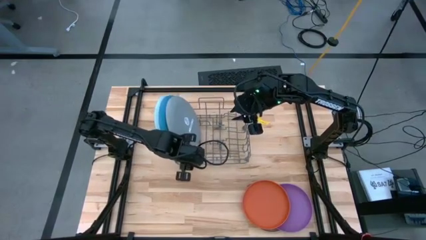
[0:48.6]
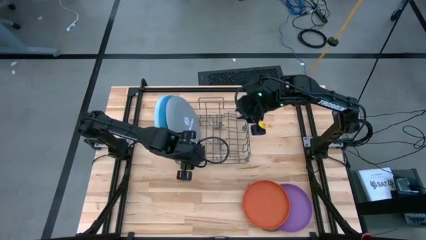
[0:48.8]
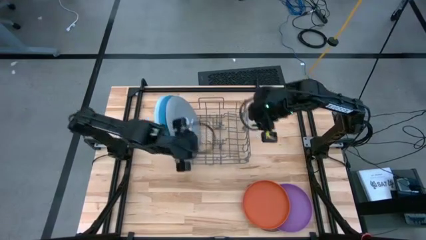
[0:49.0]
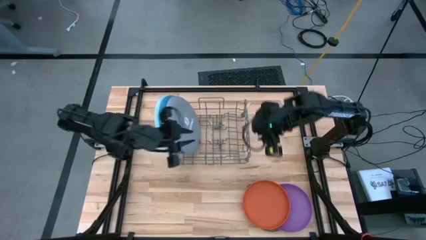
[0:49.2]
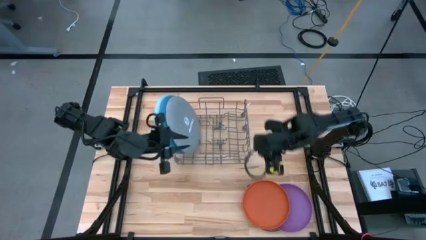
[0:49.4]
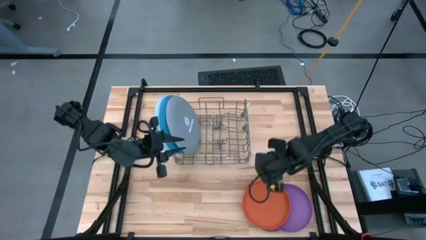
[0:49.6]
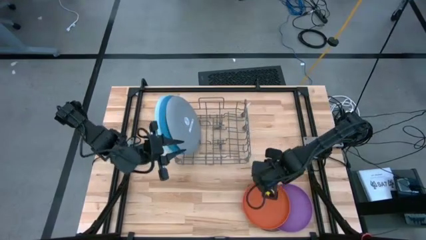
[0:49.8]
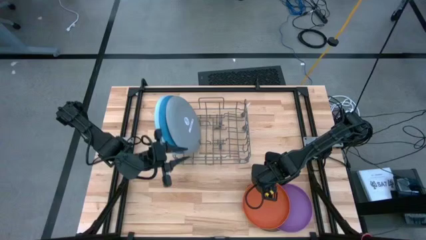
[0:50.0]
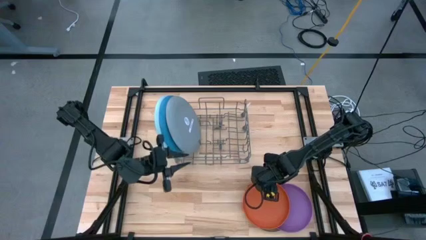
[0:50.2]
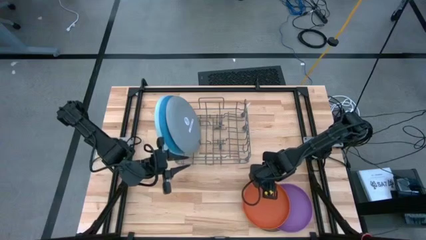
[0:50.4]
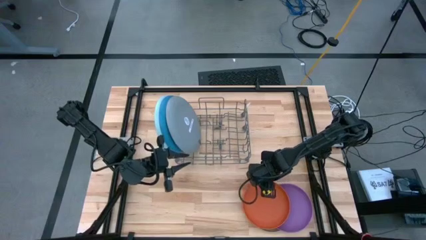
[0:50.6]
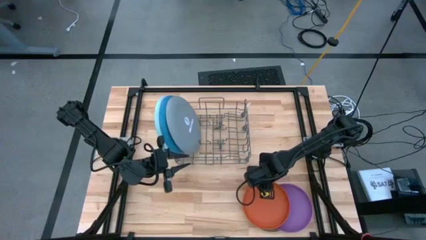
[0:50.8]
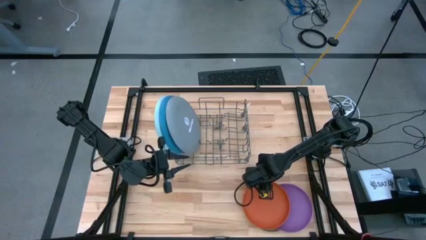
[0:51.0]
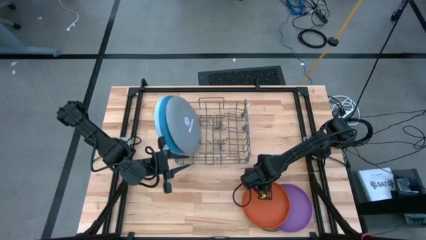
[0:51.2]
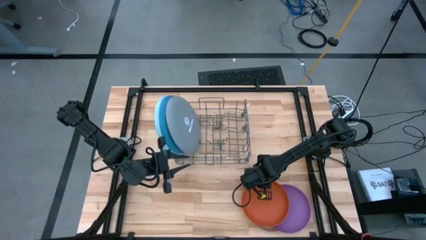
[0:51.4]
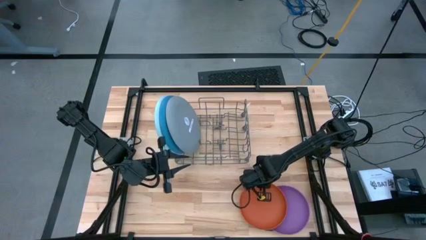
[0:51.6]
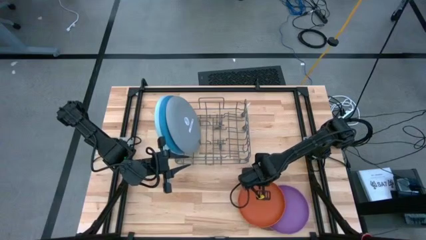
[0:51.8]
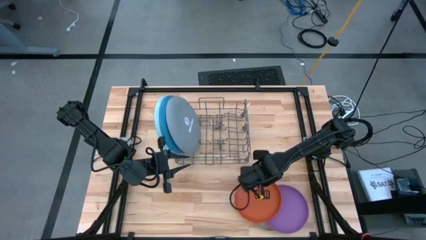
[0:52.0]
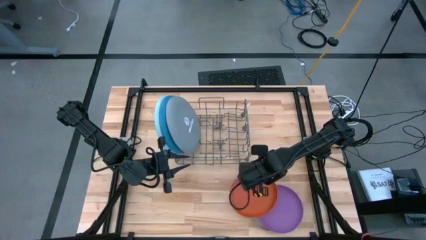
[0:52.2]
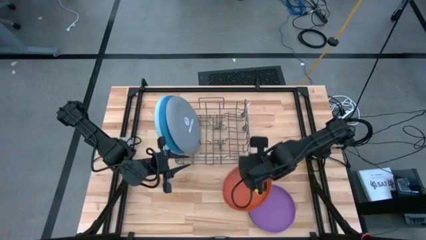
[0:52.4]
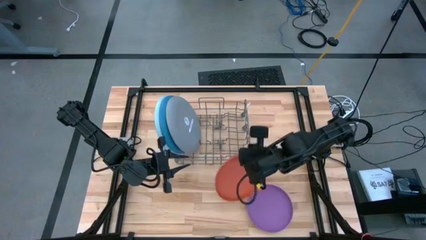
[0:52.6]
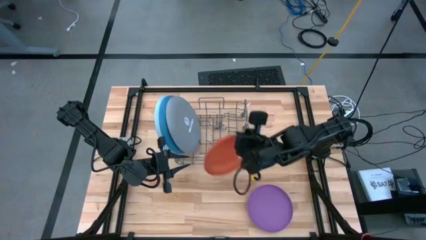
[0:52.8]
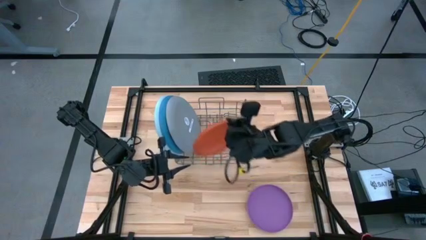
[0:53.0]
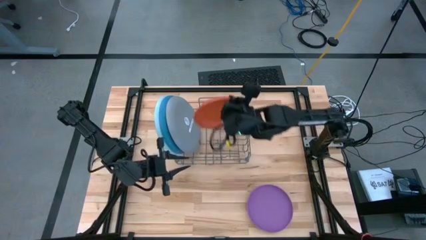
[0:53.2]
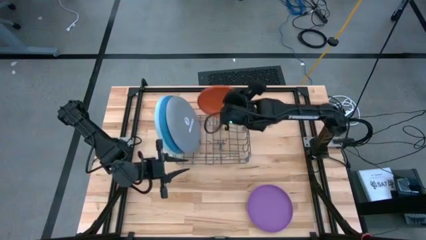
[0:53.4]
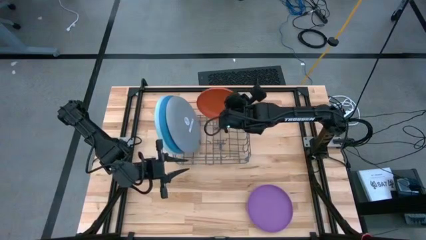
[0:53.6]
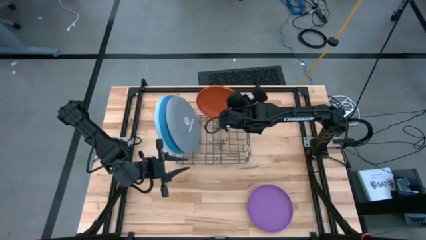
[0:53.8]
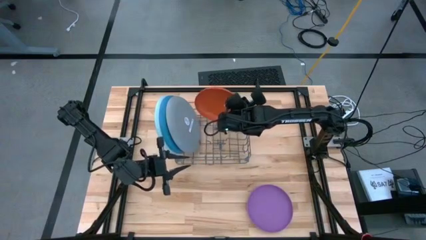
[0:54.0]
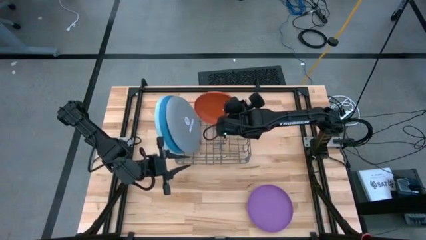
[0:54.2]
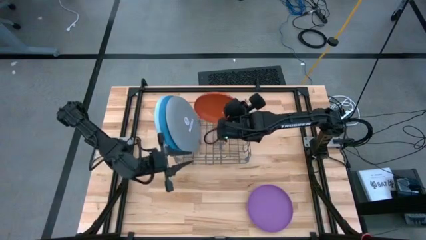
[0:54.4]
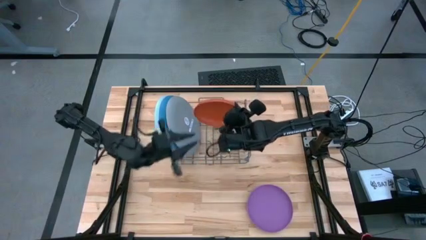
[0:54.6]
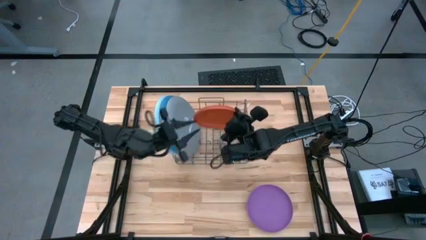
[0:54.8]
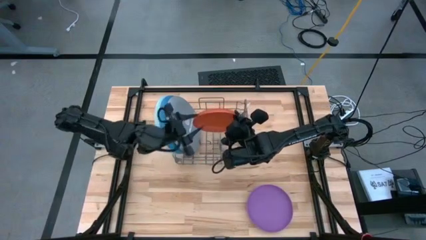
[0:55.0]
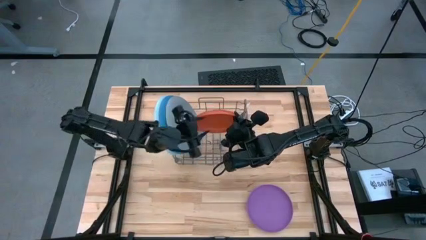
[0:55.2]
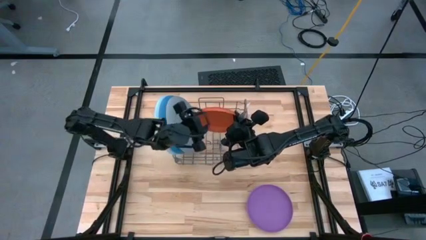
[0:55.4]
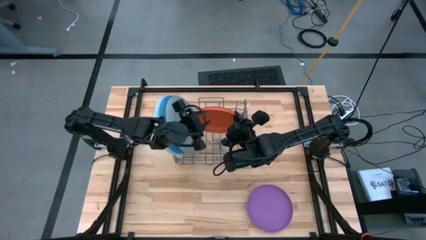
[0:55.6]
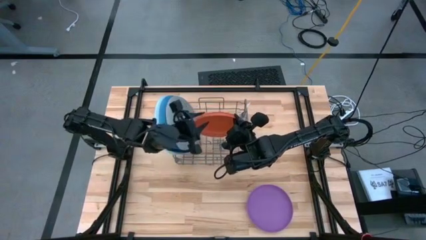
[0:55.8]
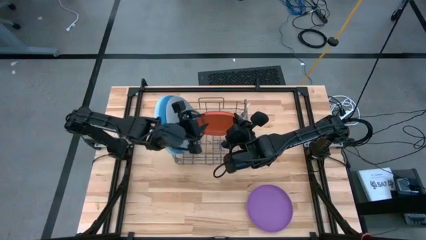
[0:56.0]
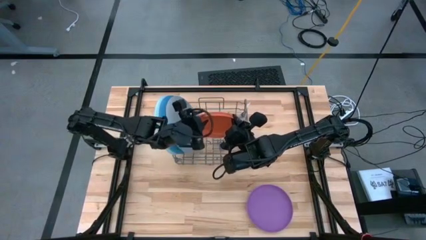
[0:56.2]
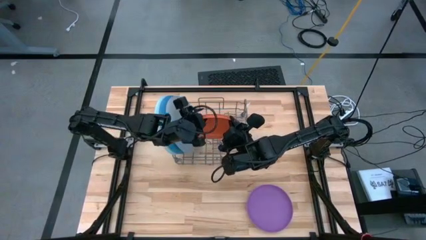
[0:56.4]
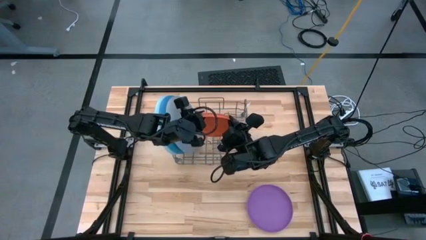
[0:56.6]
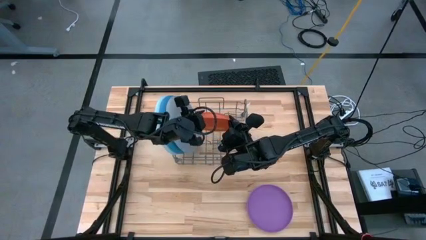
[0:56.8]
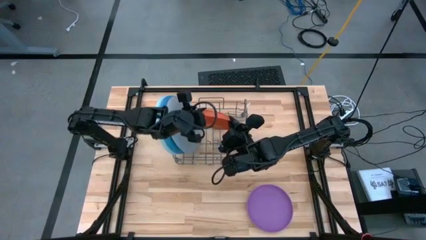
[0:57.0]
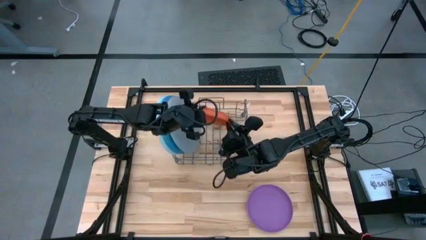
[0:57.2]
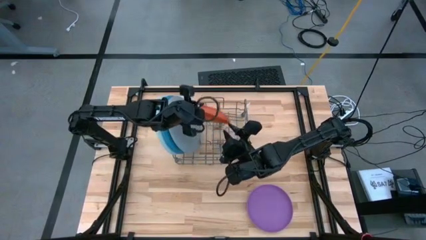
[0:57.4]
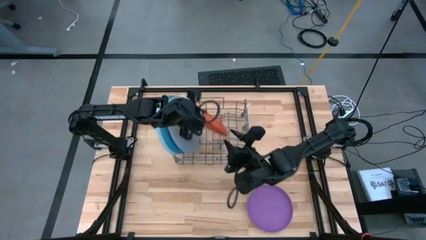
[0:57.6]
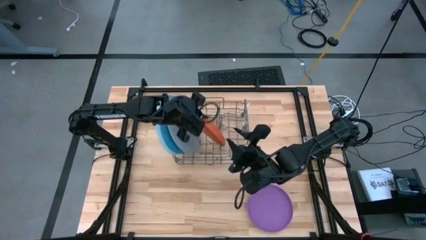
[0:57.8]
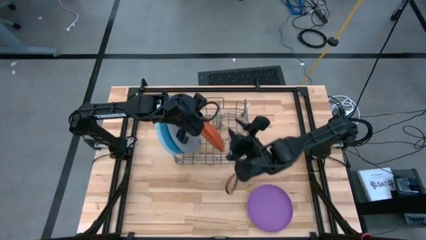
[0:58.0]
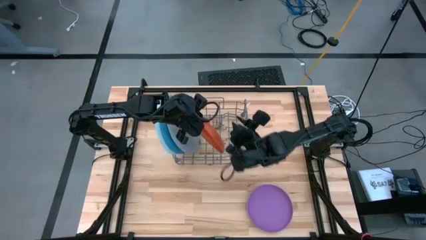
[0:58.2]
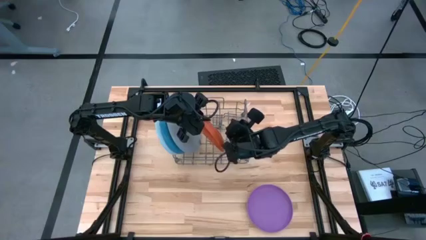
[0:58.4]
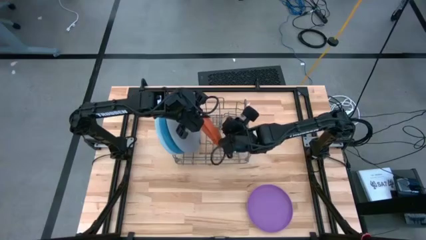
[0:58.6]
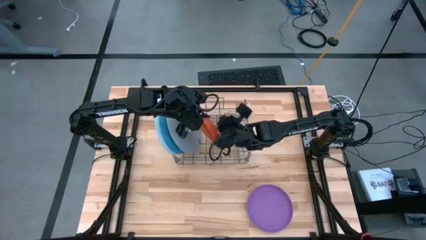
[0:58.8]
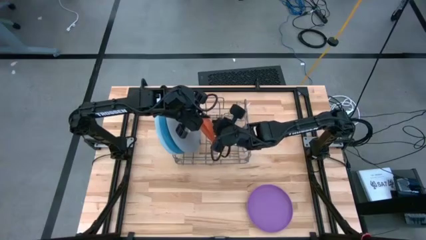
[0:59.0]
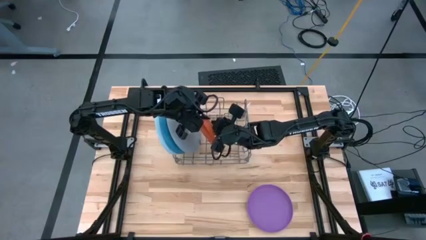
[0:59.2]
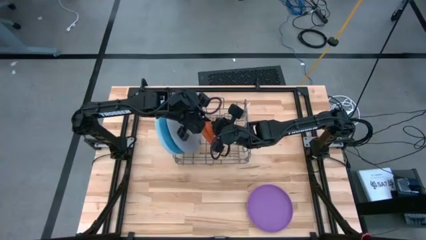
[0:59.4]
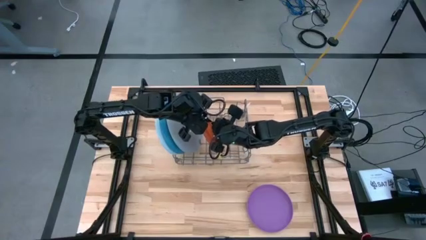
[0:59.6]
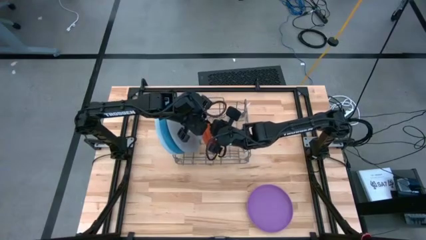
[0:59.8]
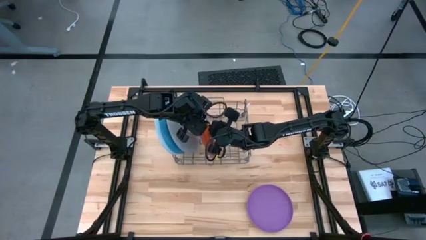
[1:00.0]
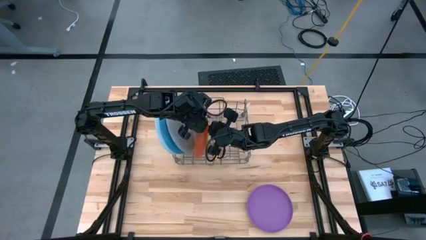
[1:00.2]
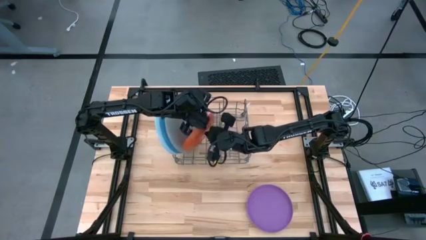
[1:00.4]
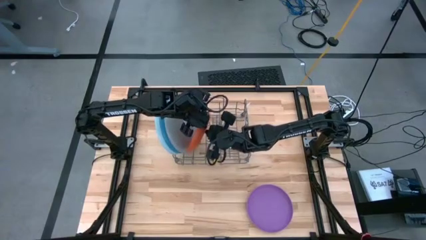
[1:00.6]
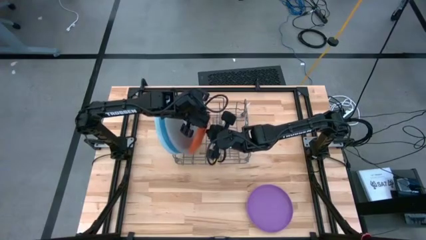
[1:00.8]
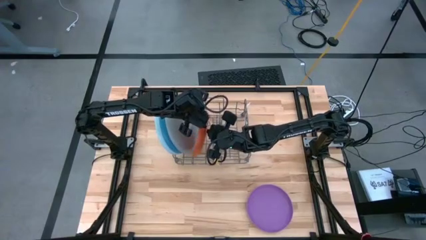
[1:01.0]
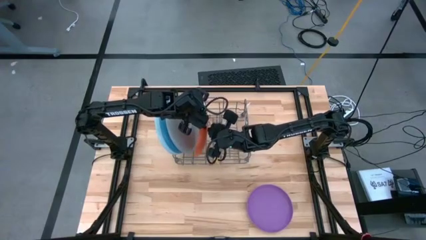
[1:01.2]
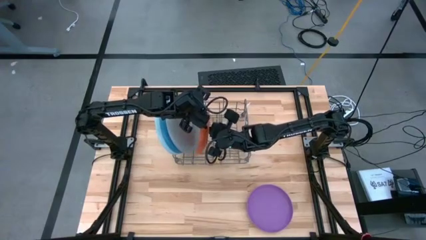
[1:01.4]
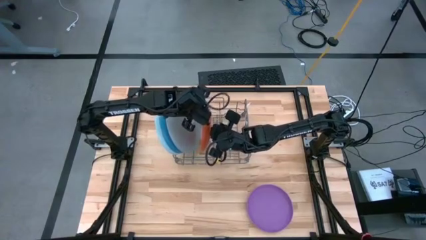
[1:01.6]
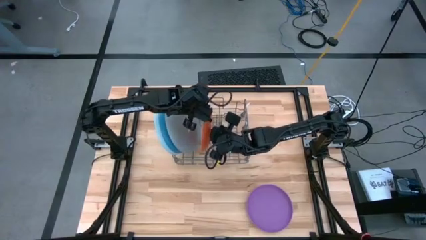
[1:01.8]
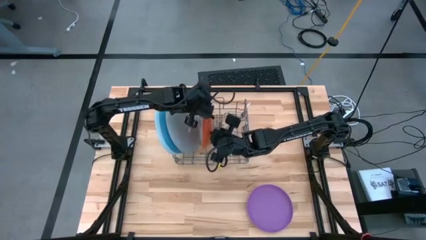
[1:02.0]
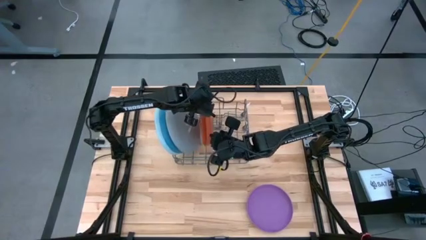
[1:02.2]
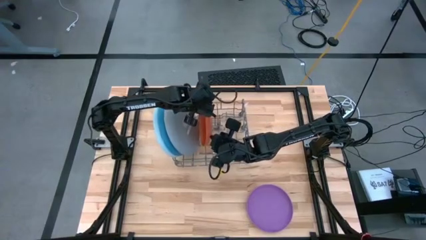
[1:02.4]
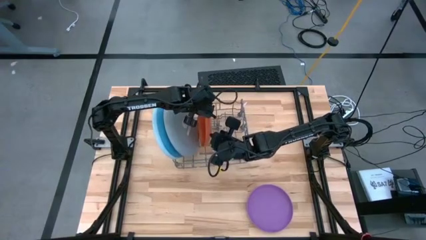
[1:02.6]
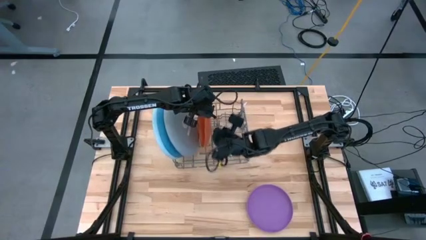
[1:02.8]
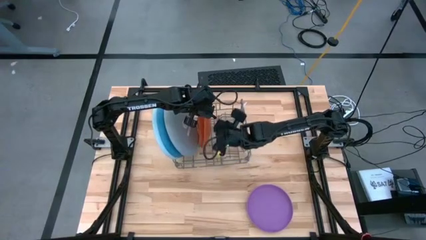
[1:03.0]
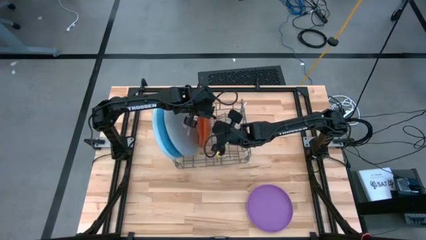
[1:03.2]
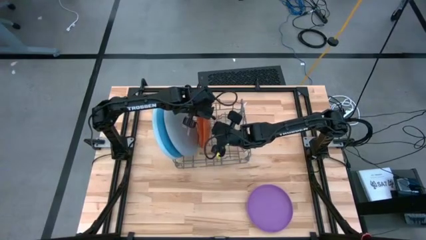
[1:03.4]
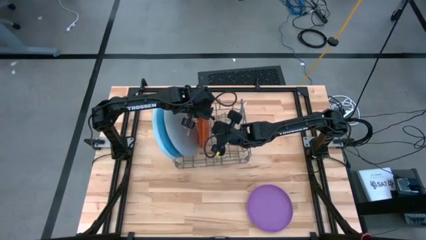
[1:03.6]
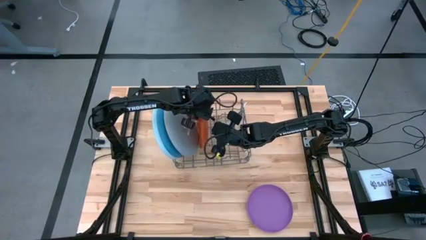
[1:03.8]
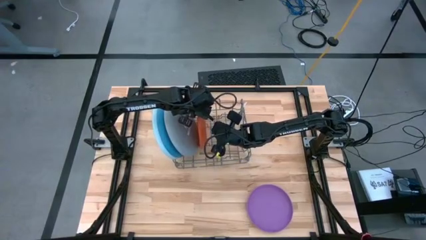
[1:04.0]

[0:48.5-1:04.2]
Task: Sort dishes
Put the orange plate in the dish rack
